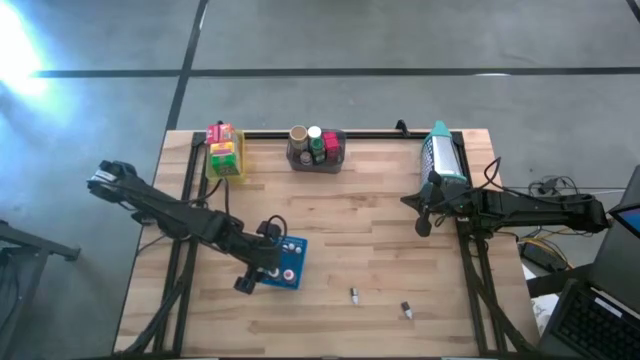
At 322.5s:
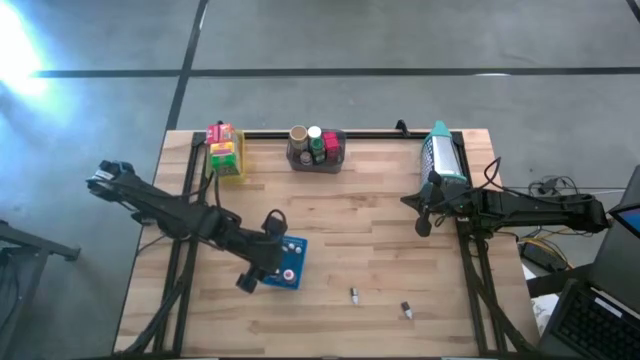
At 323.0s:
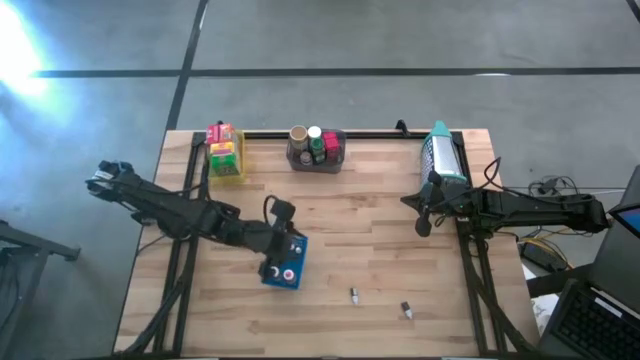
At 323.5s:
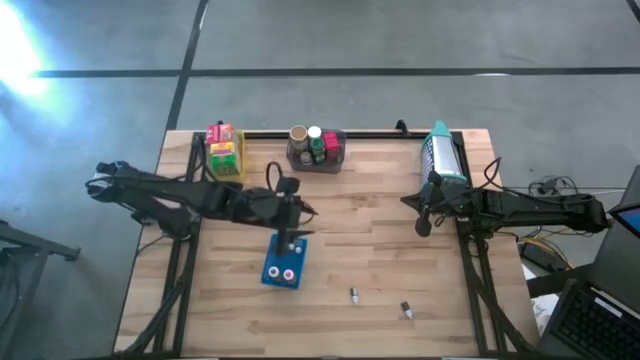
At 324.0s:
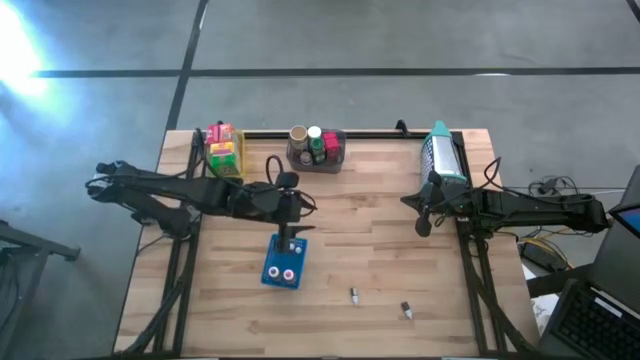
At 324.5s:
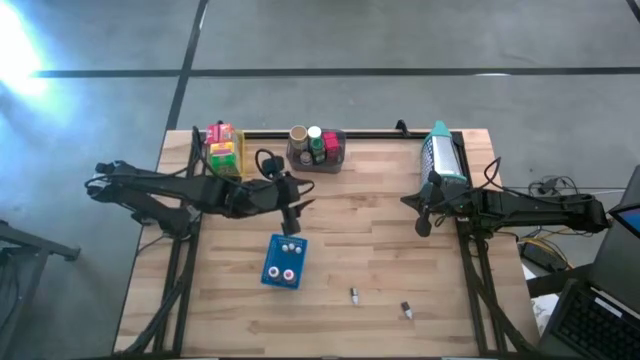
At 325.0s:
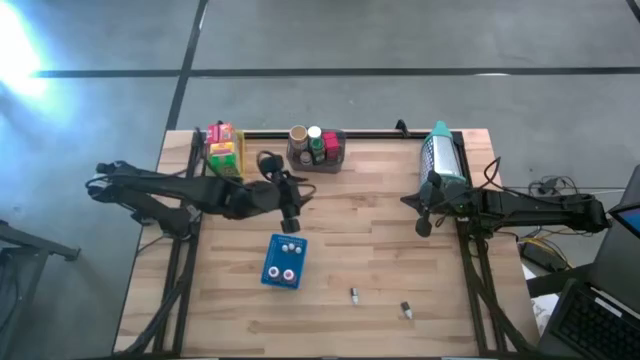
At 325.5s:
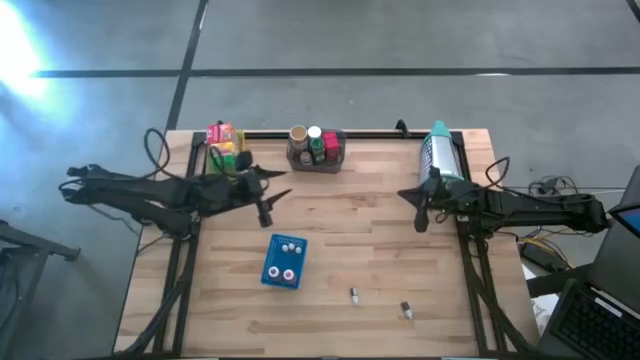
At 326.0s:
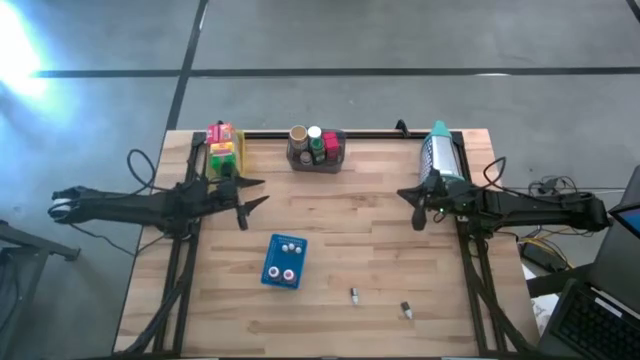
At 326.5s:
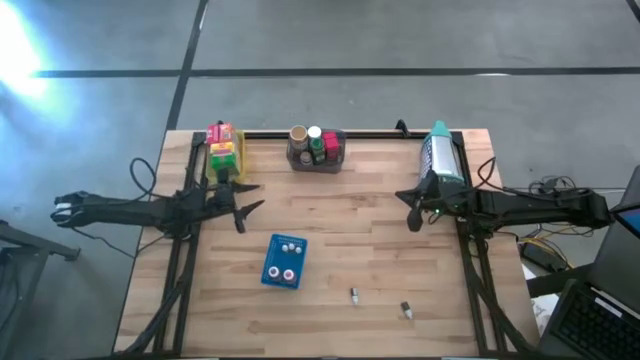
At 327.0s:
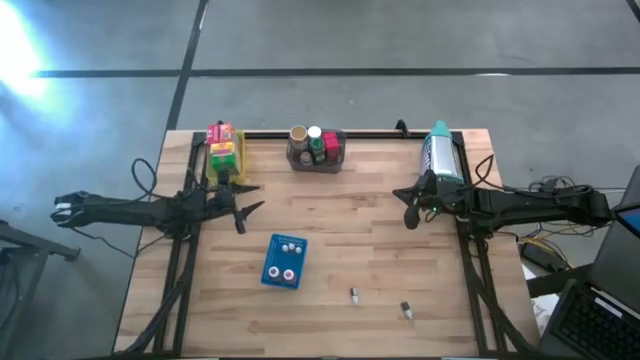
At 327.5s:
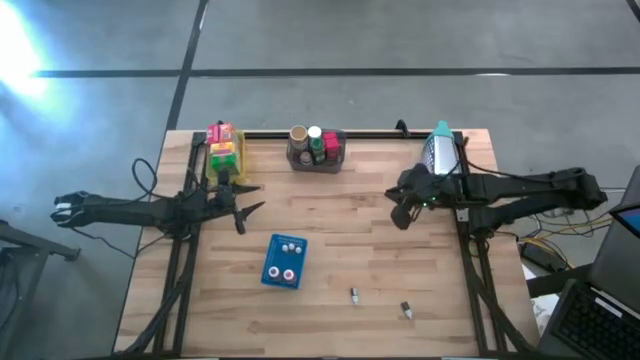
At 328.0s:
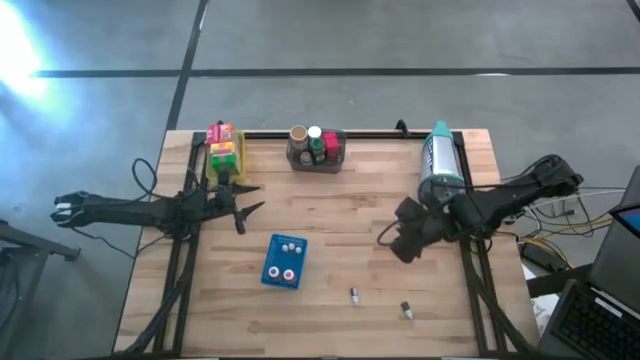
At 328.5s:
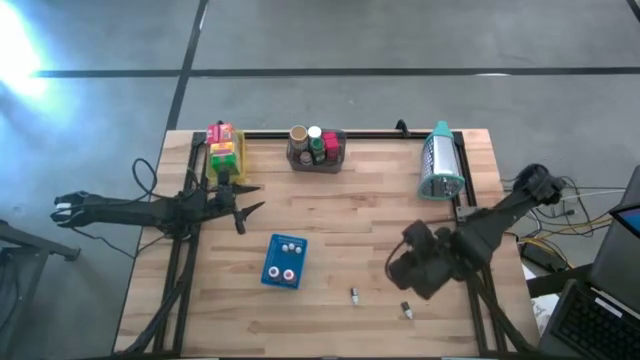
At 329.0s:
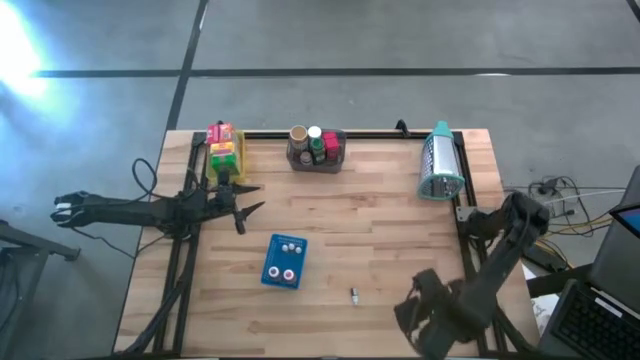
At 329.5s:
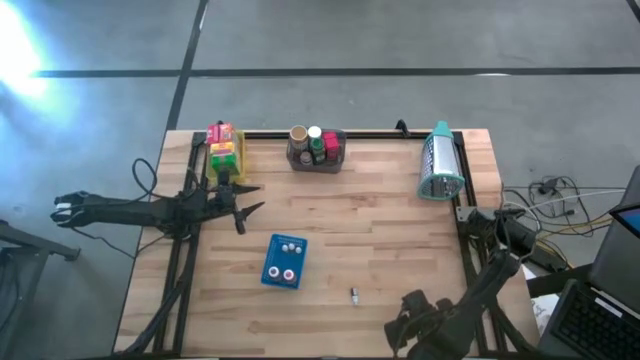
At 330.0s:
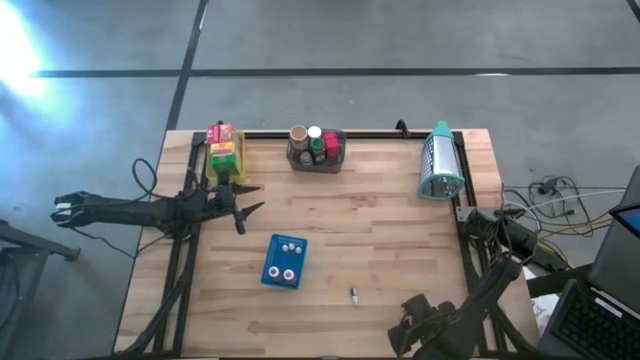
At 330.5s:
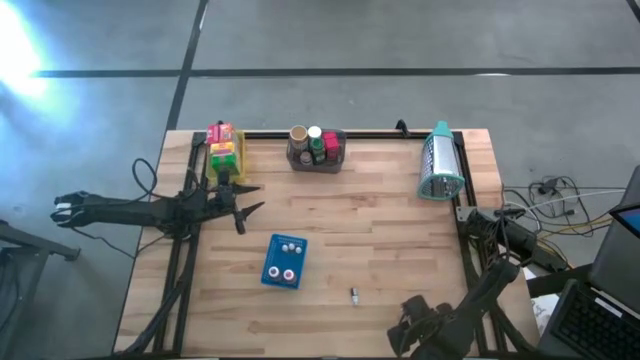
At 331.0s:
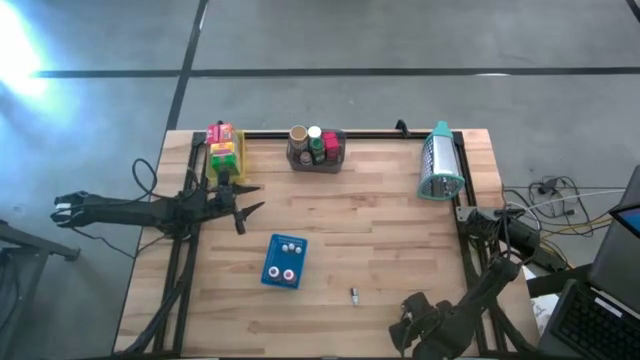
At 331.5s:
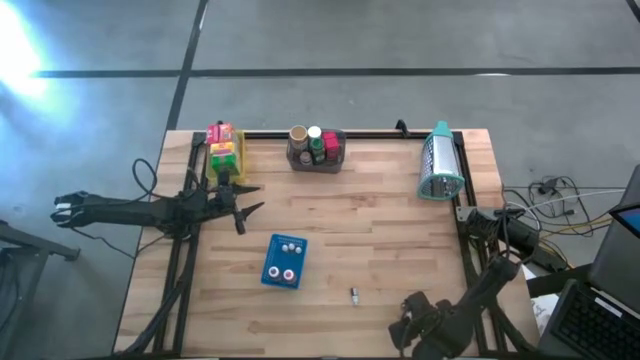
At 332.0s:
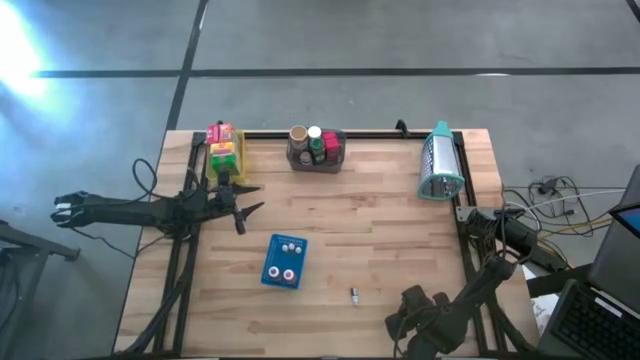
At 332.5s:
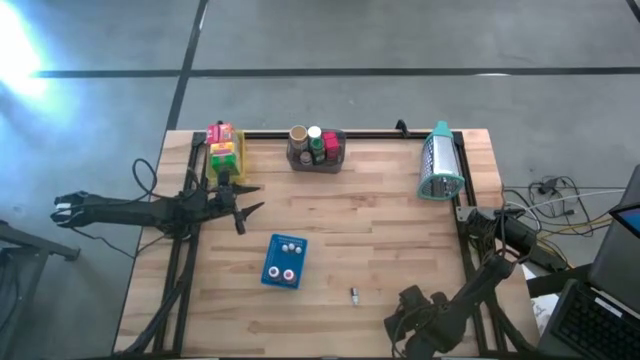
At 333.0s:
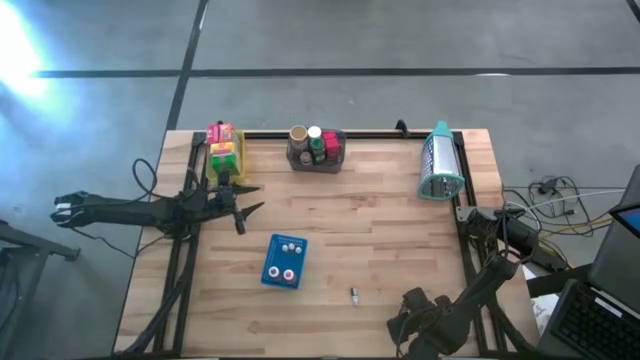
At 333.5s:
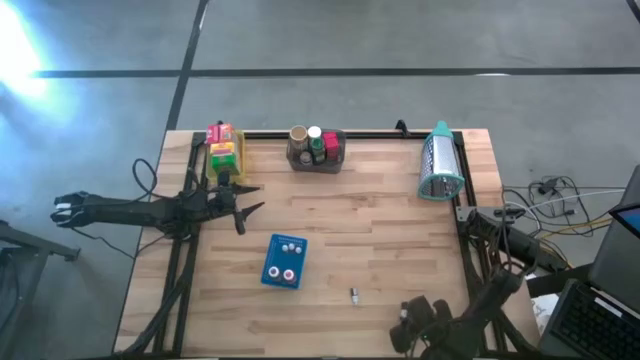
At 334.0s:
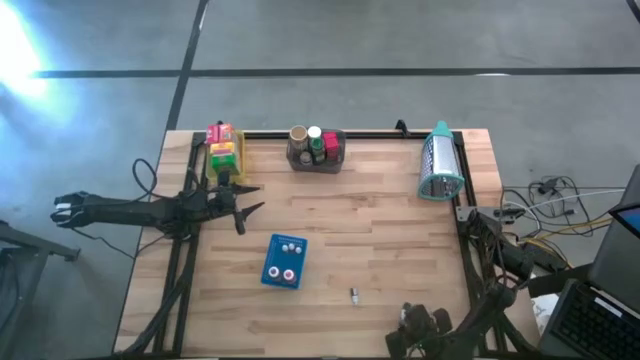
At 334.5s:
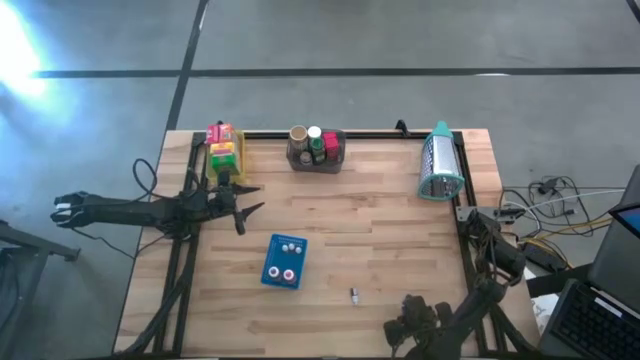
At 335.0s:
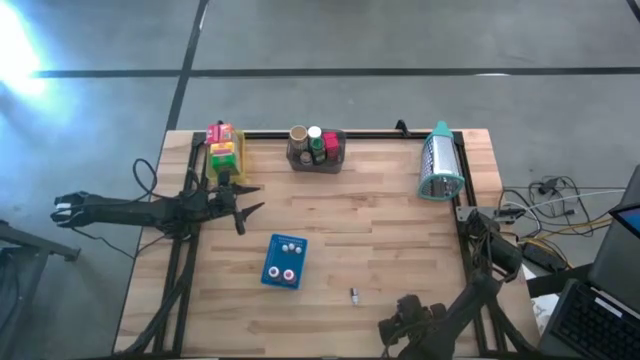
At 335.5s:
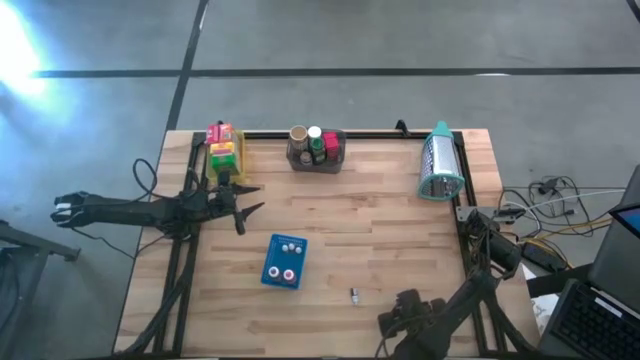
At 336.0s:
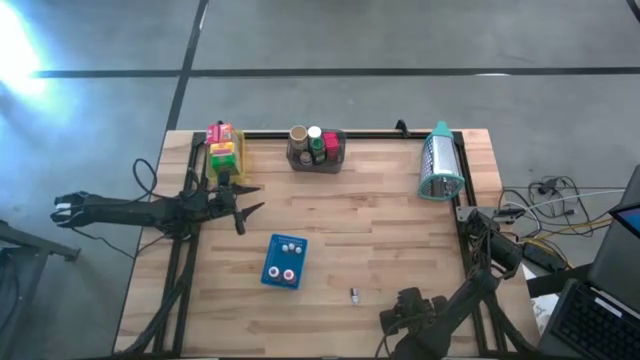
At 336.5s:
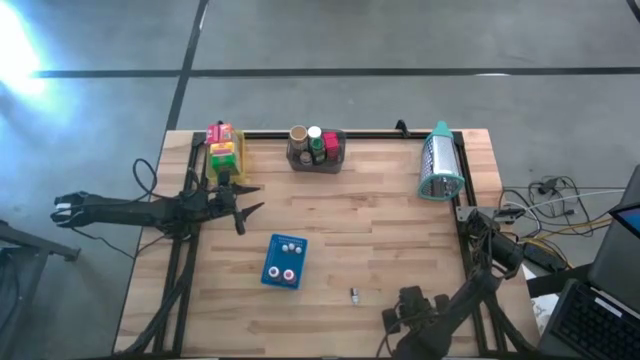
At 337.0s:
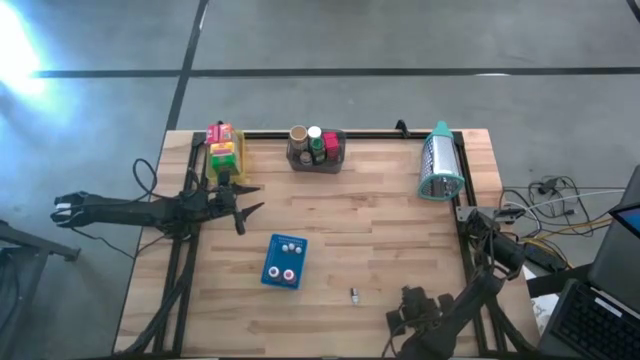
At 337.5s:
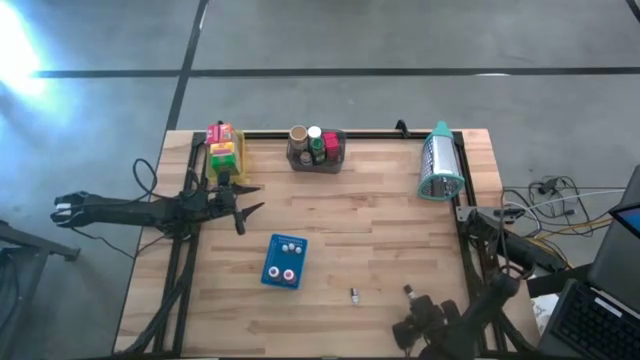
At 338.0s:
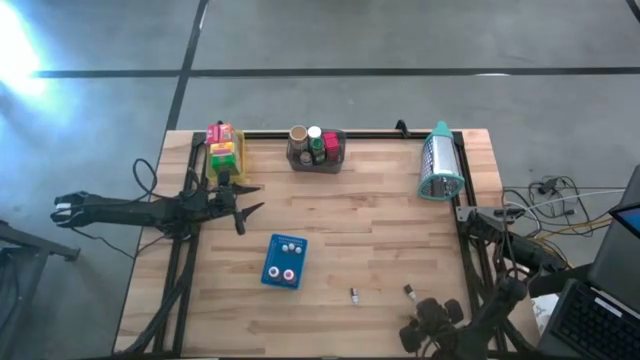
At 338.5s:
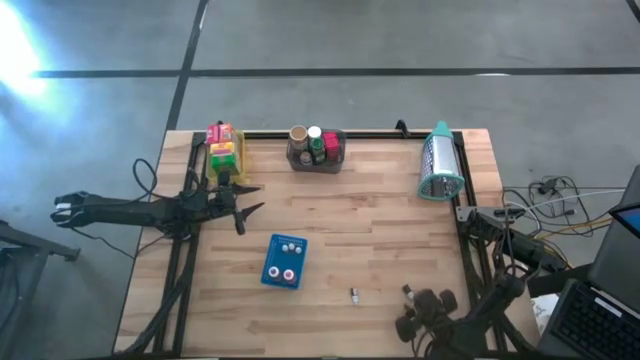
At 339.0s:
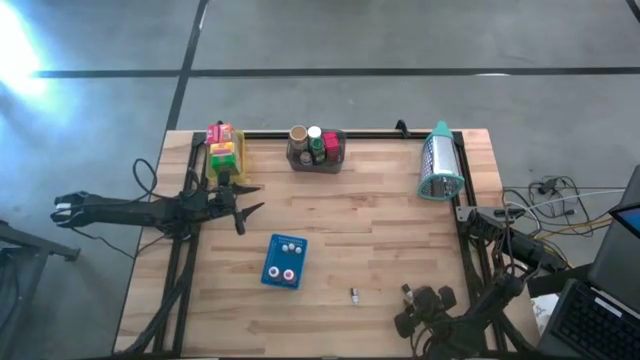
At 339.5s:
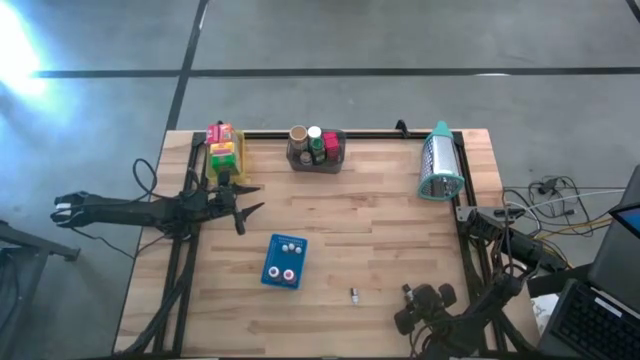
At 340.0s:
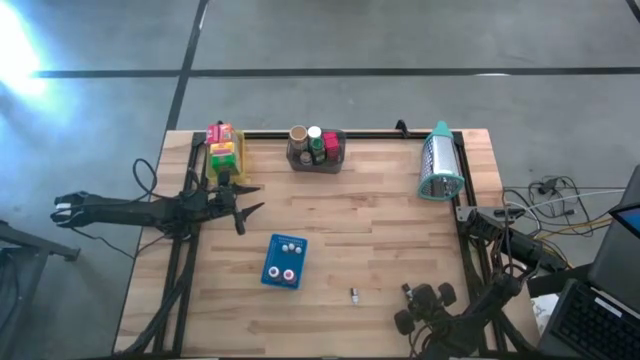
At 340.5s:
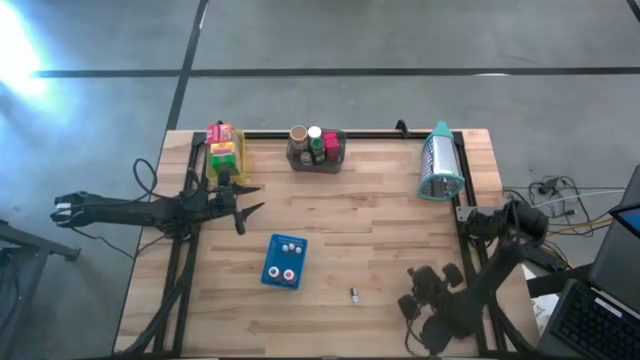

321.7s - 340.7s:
Task: Pick & Place Kitchen Items
Put the black food coloring bottle into the blue bin

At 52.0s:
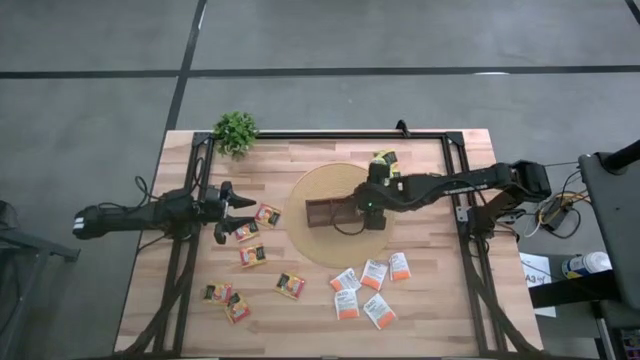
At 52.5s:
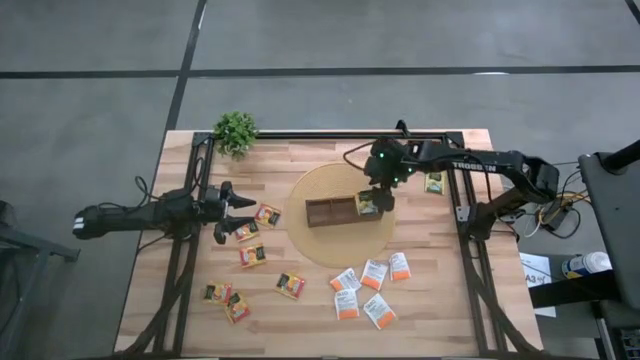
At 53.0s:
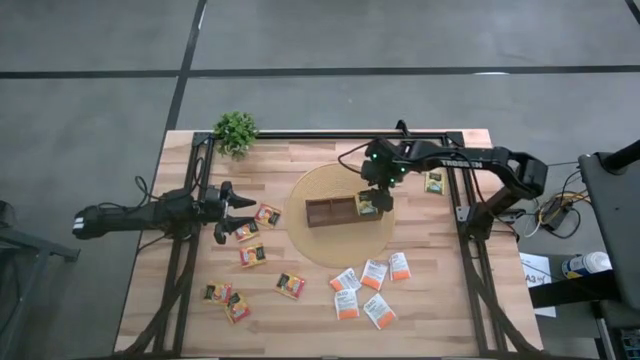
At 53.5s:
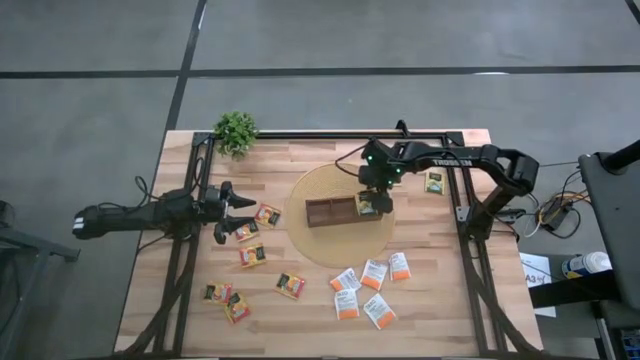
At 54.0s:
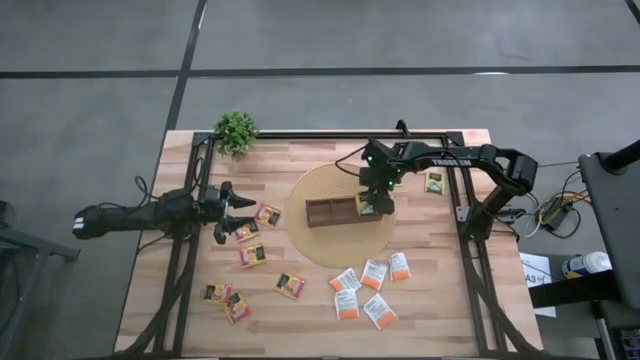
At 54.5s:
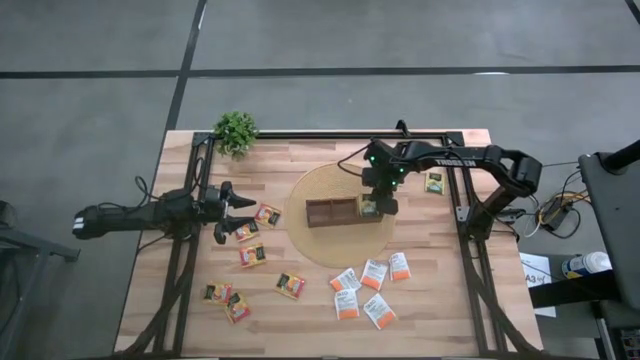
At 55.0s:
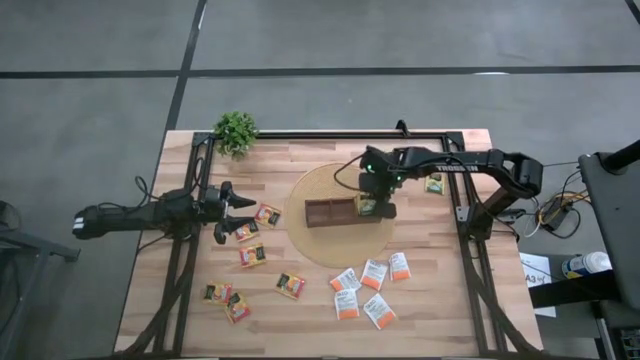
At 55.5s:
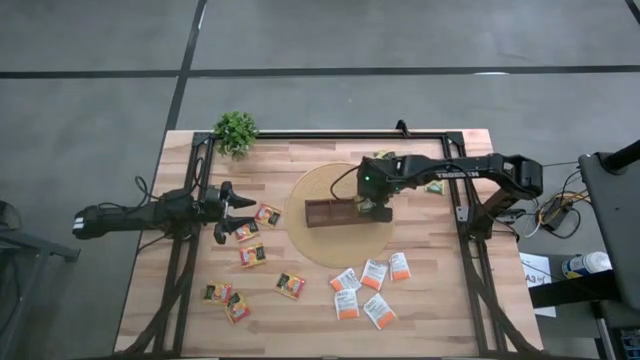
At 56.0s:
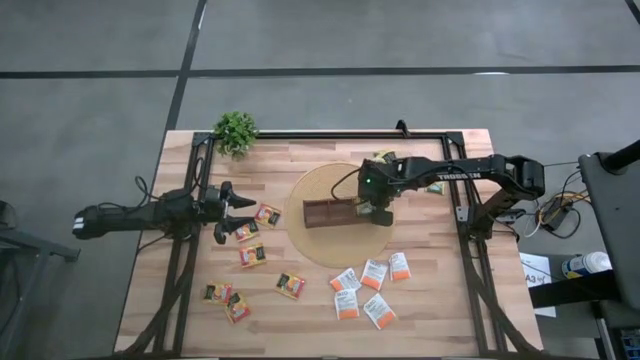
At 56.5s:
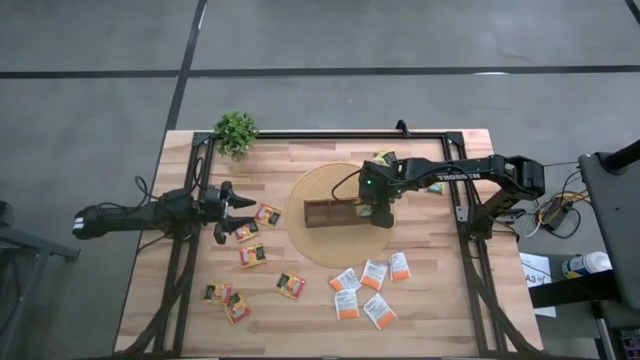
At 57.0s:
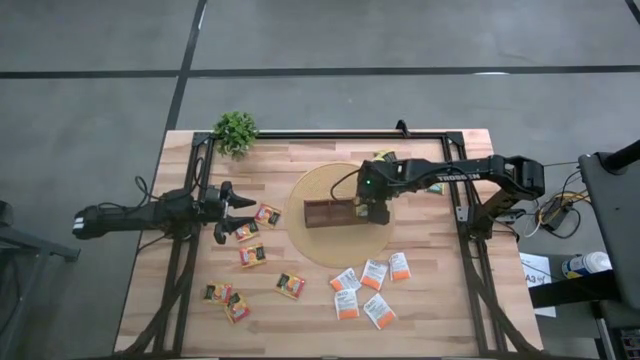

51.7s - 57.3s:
Task: Pick & Place Tea
Adjust the yellow tea bags in the right section of the wooden organizer
